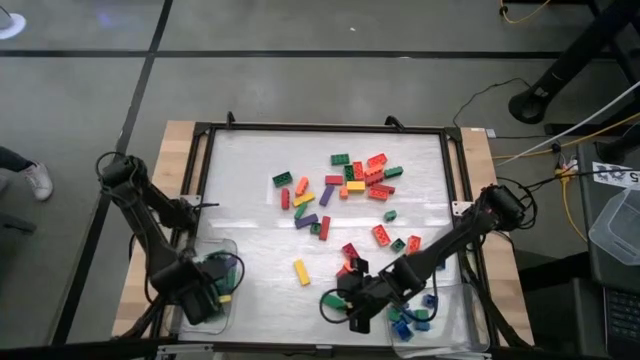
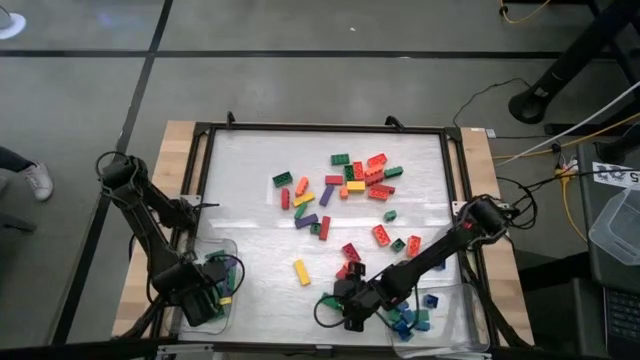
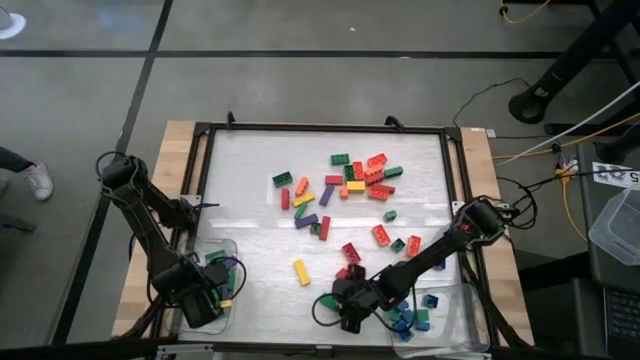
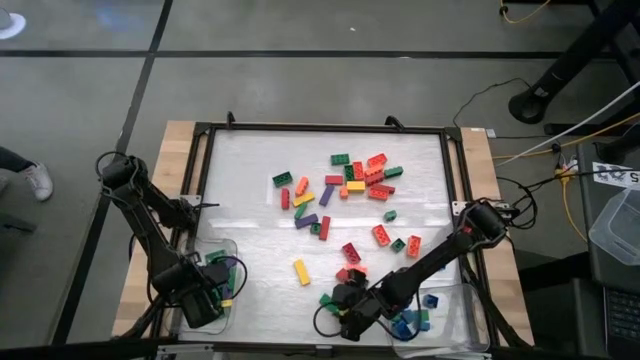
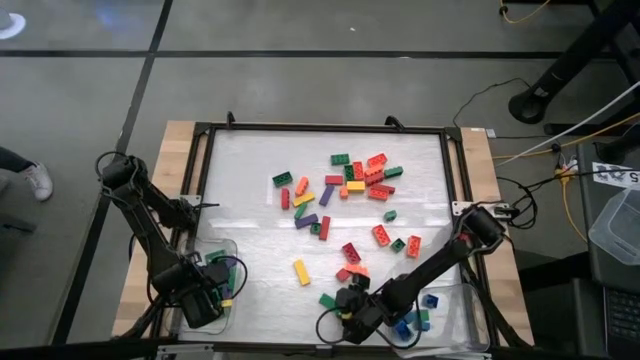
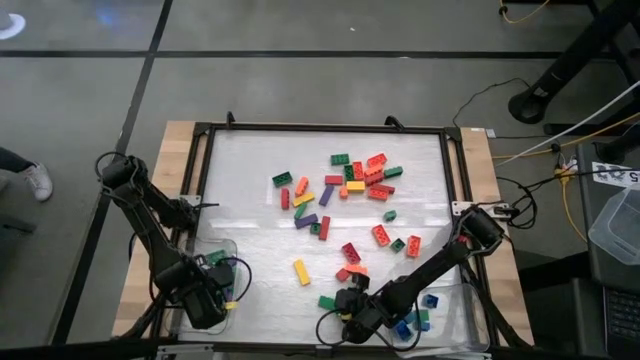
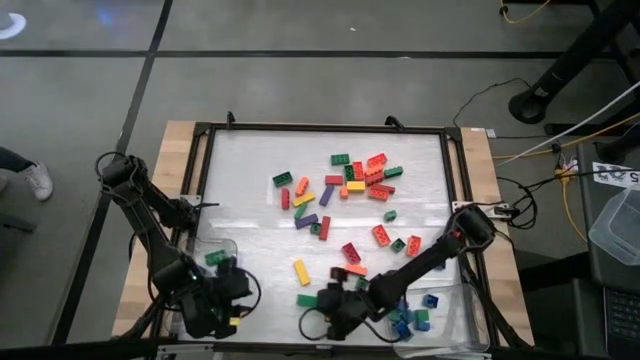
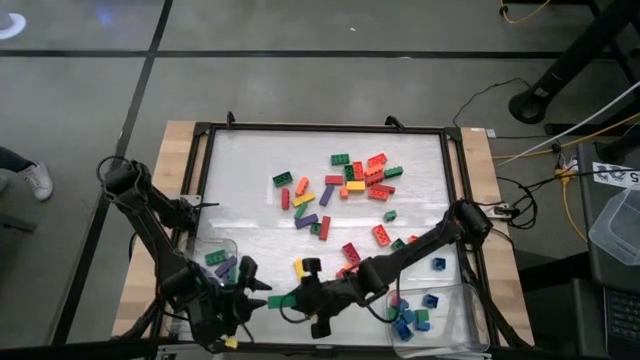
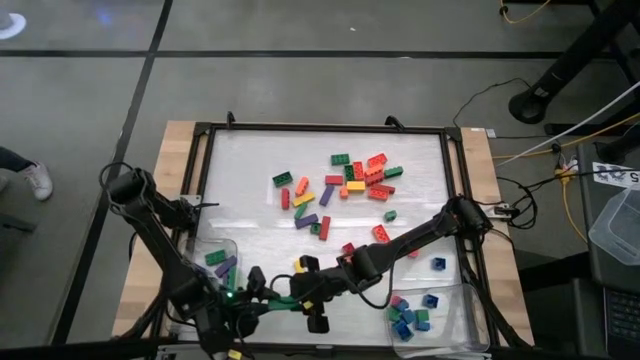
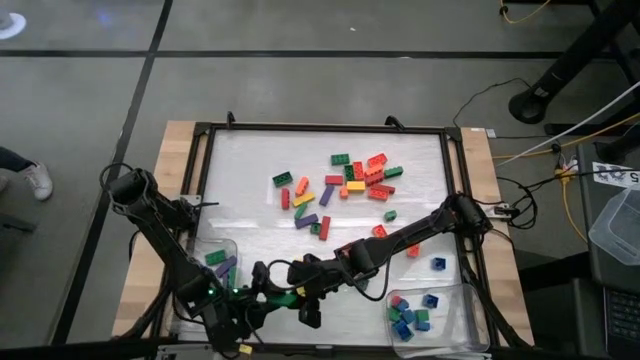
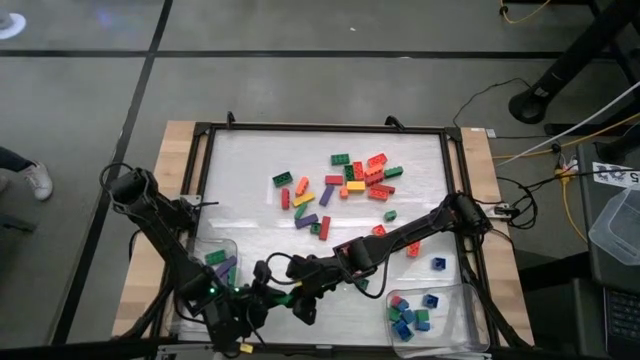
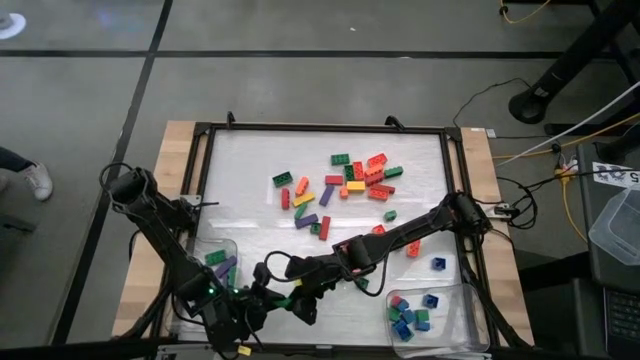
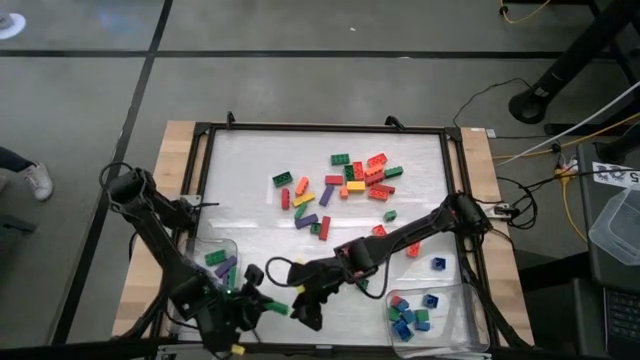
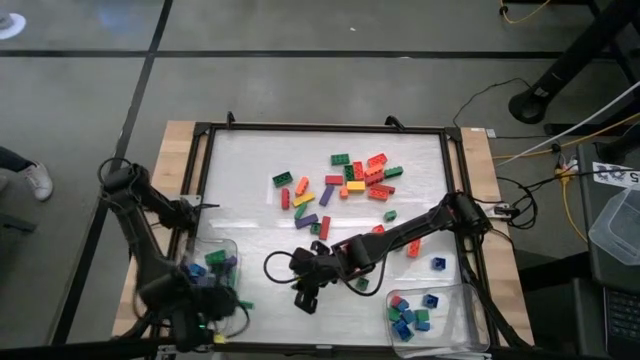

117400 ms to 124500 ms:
Task: Sort blocks by size
Put the large green block into the left transparent bin

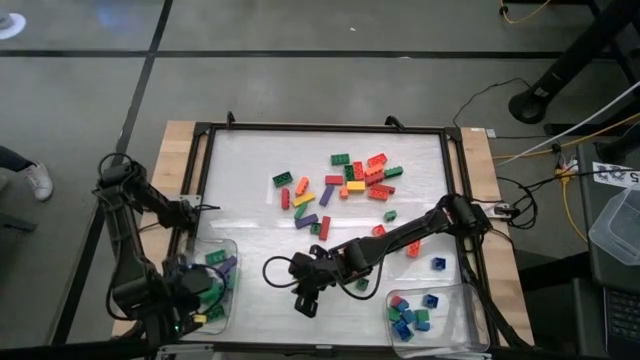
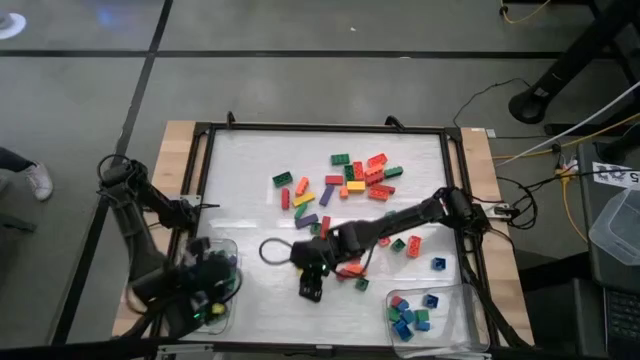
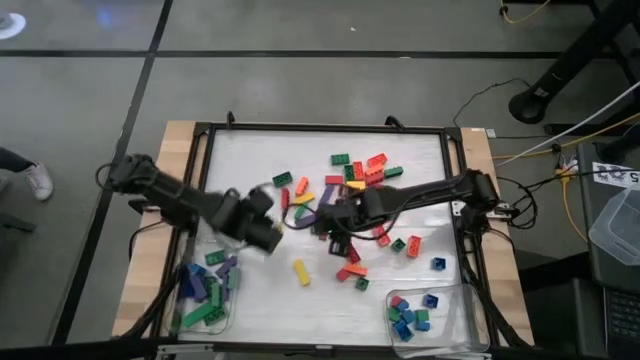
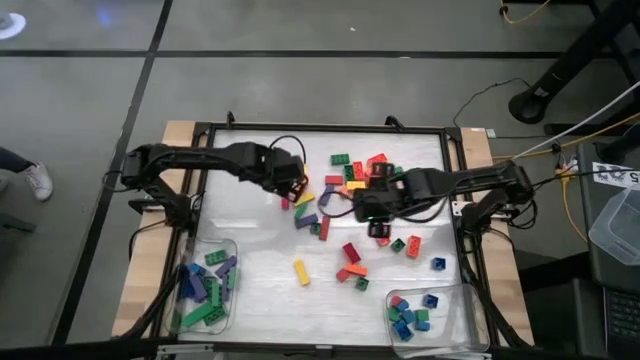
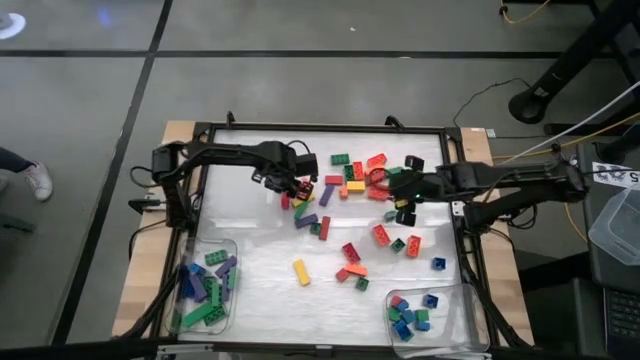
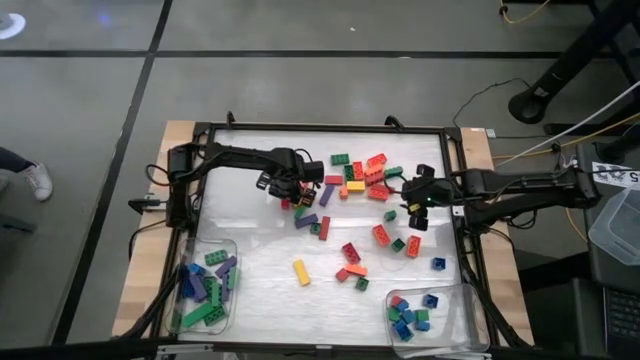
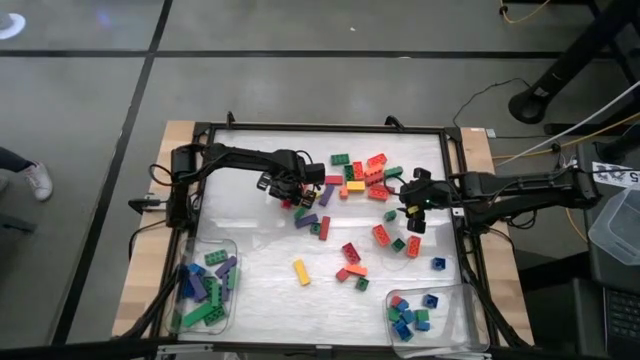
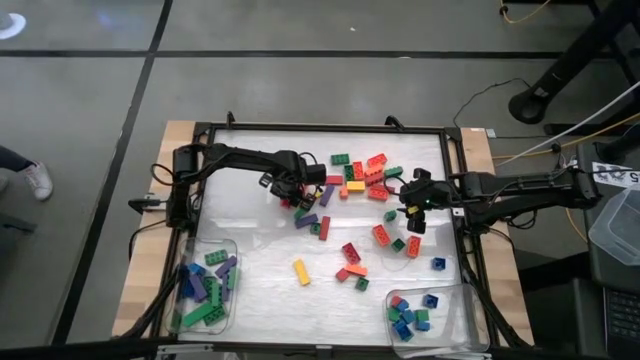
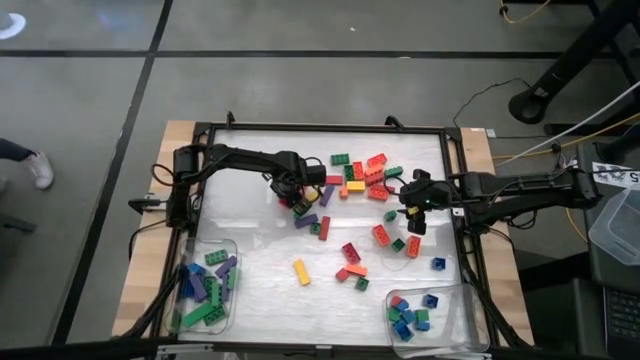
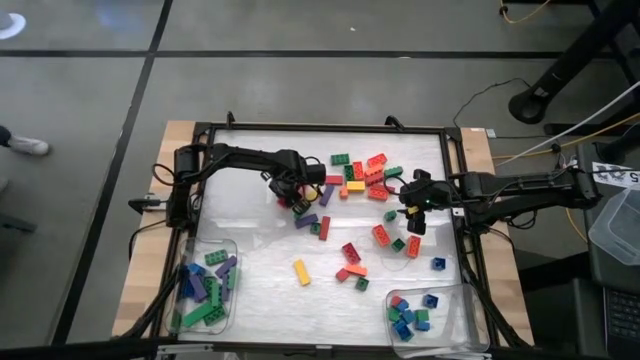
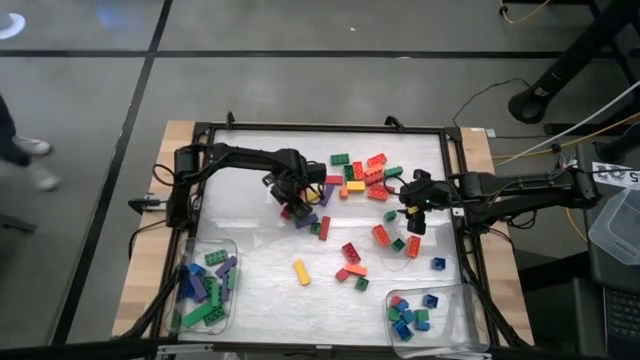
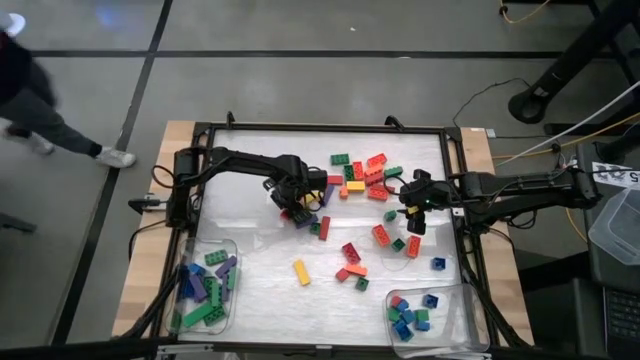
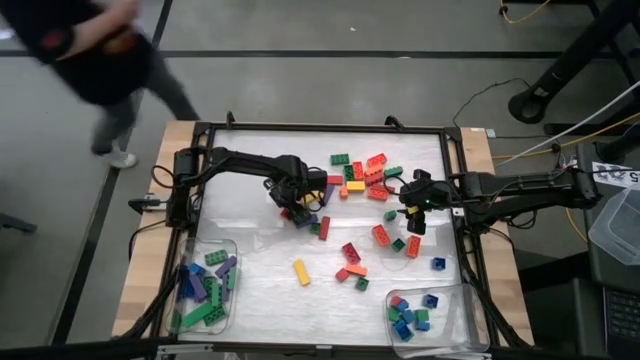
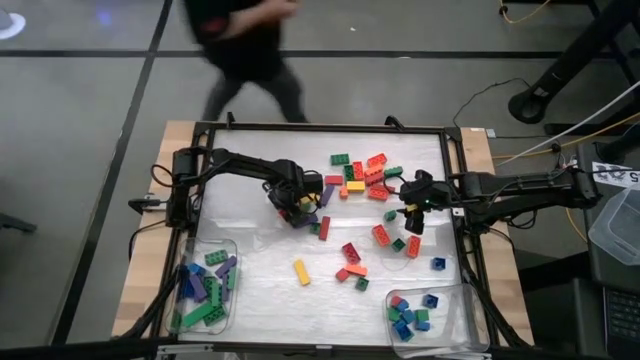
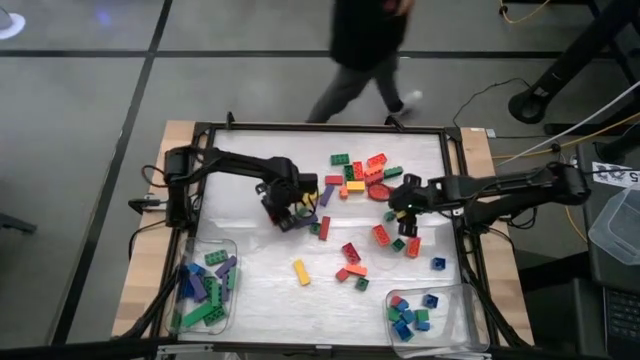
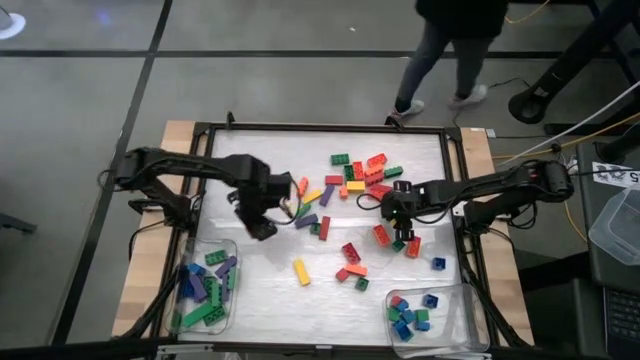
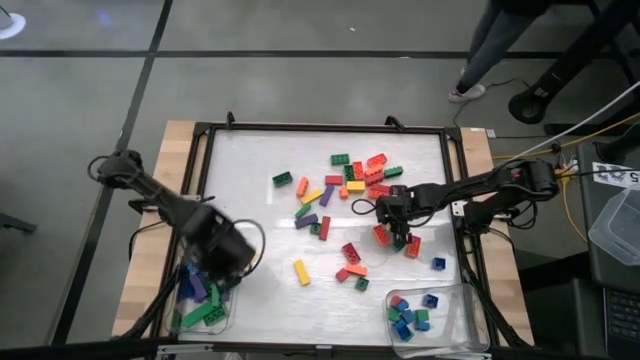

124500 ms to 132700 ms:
Put the large red game piece into the left transparent bin

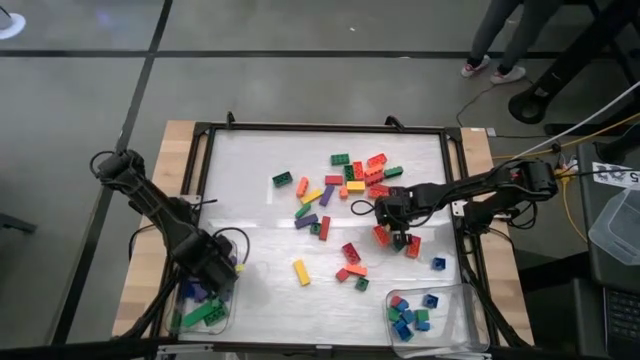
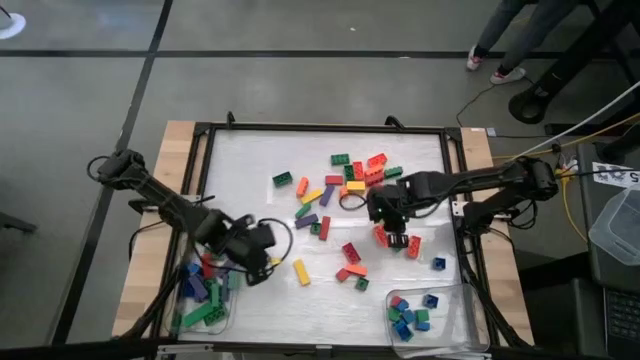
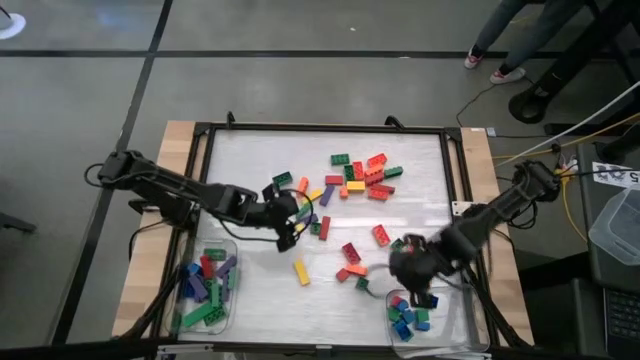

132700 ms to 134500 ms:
Put the small green game piece into the right transparent bin

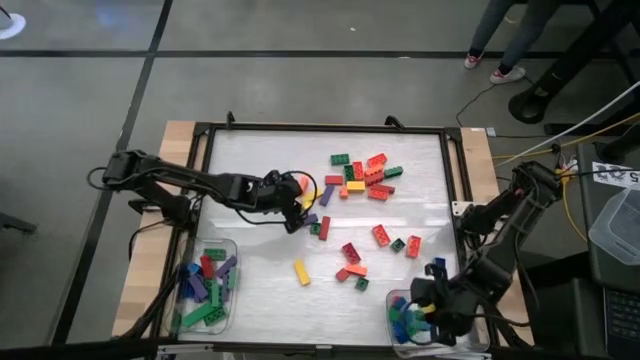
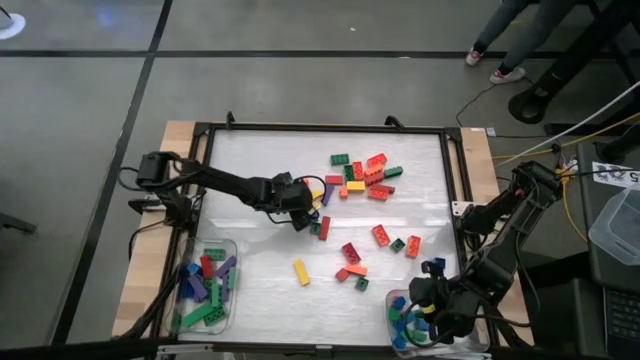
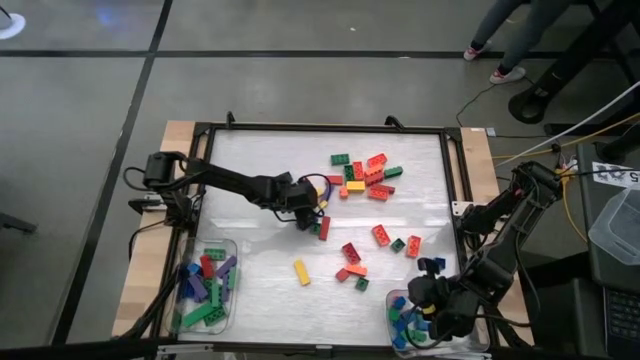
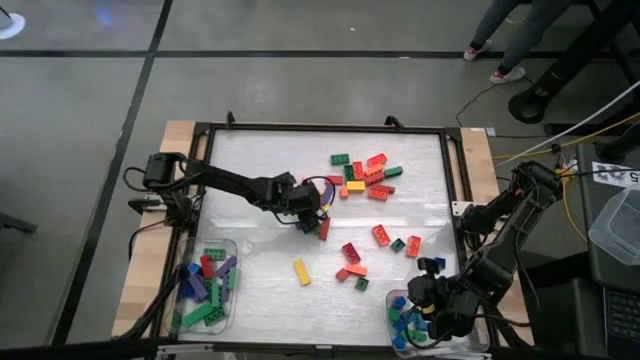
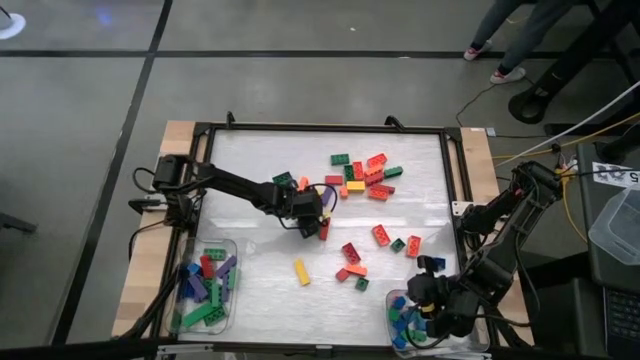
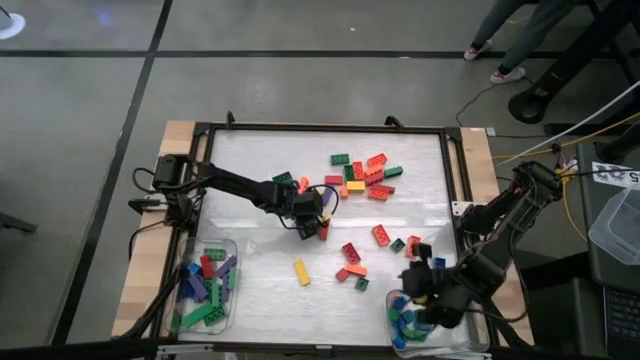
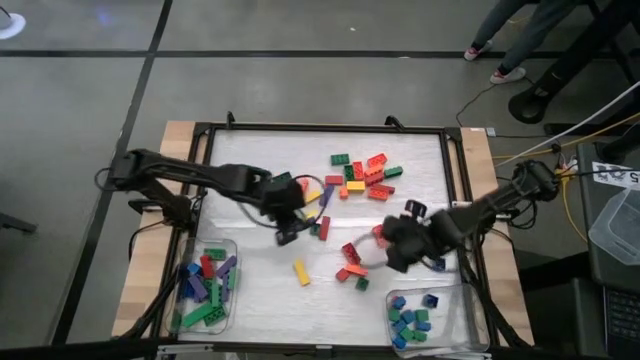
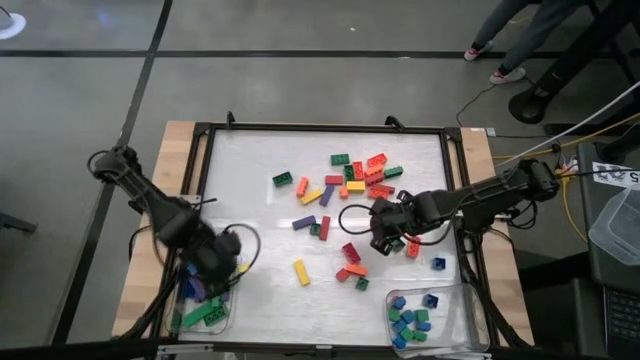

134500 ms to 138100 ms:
Put the large green block into the left transparent bin
